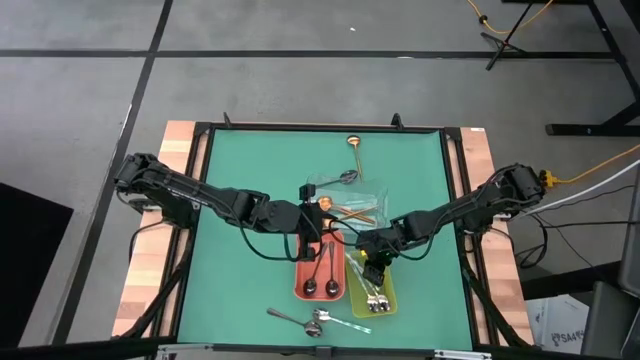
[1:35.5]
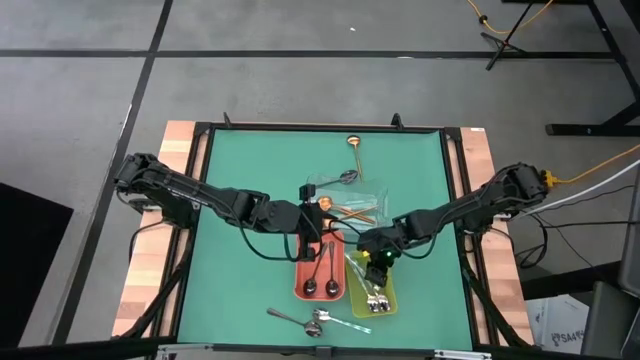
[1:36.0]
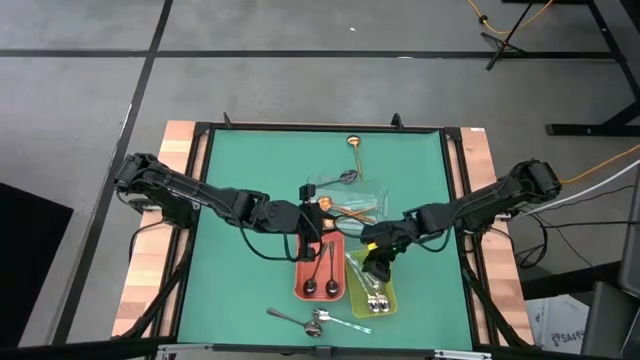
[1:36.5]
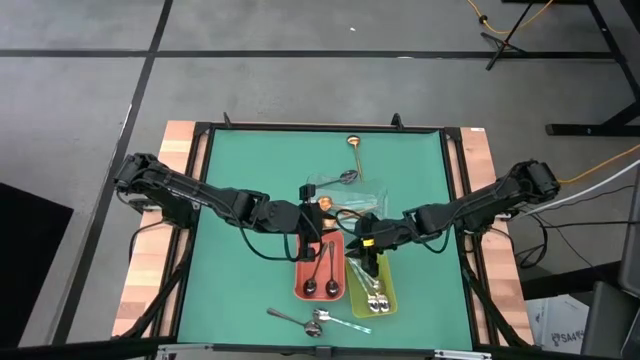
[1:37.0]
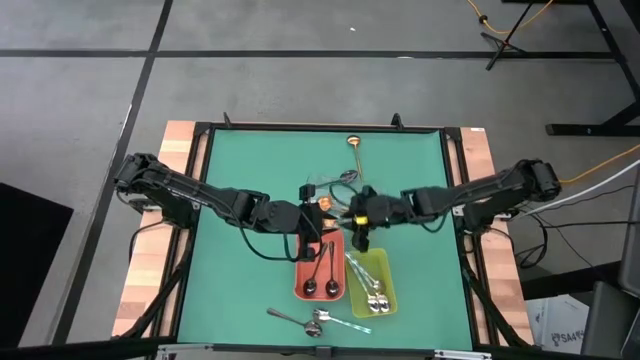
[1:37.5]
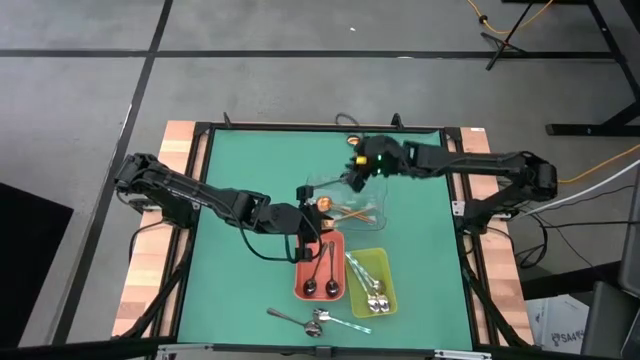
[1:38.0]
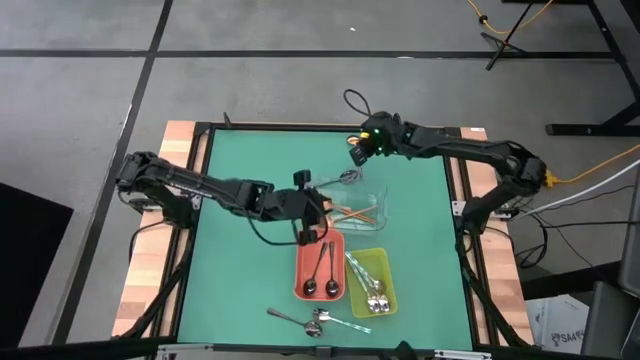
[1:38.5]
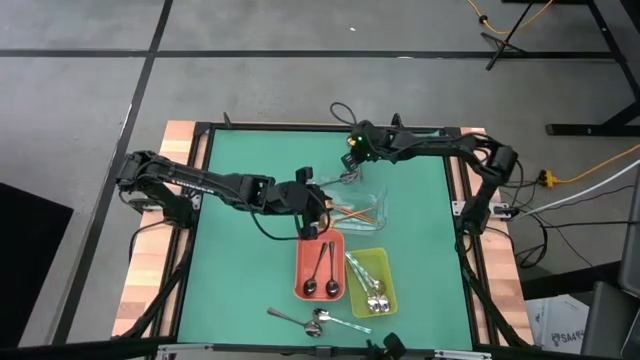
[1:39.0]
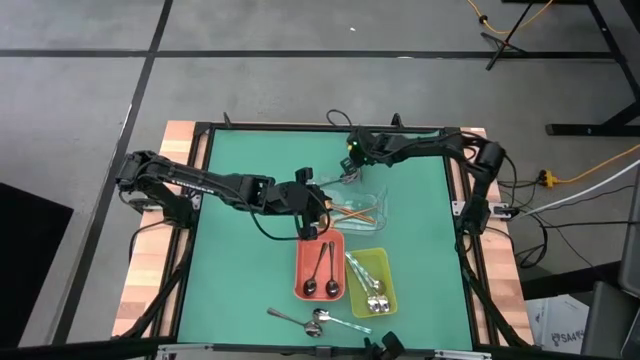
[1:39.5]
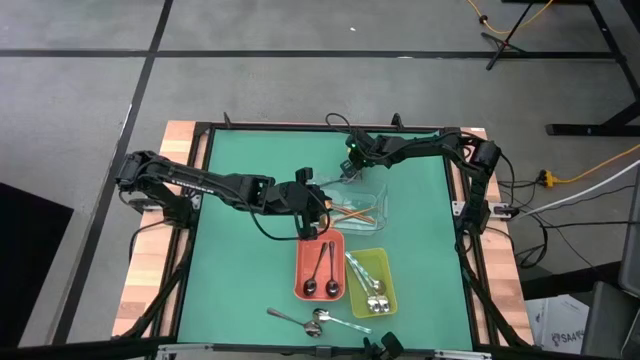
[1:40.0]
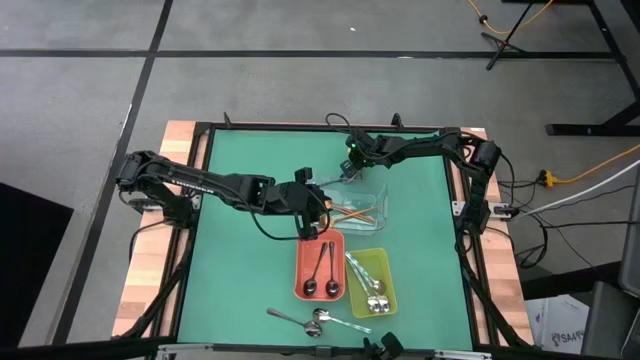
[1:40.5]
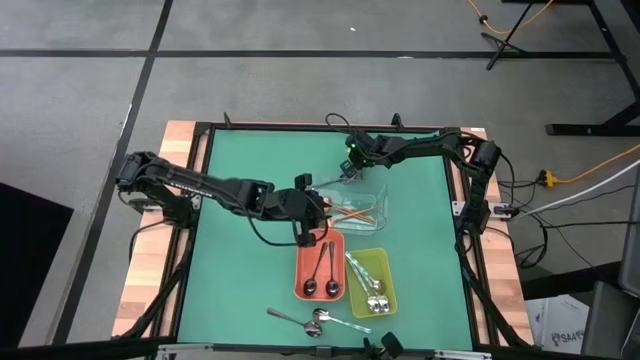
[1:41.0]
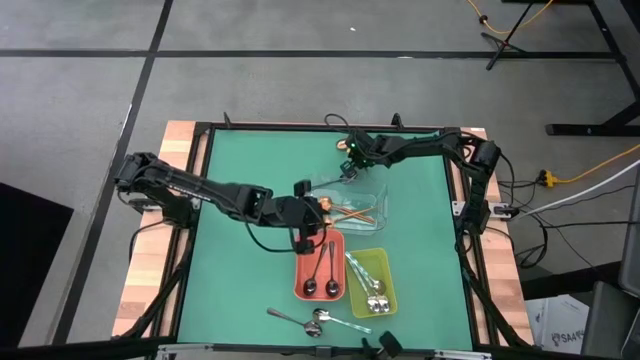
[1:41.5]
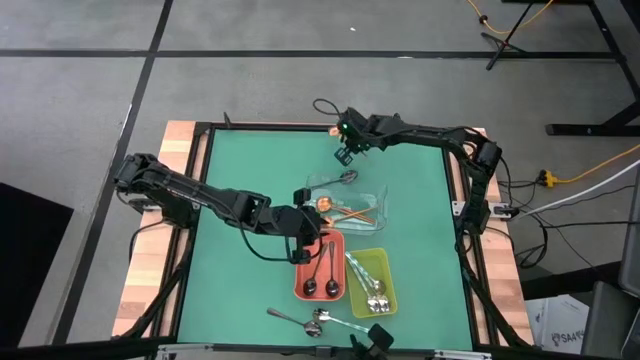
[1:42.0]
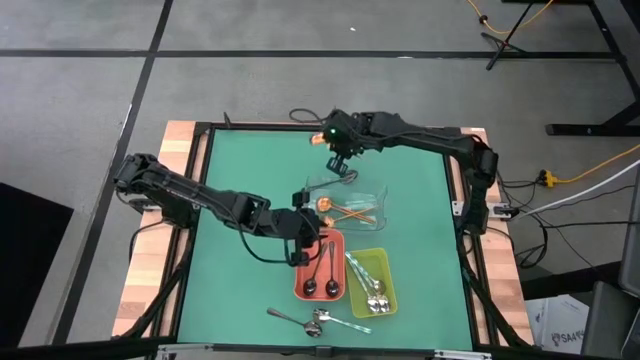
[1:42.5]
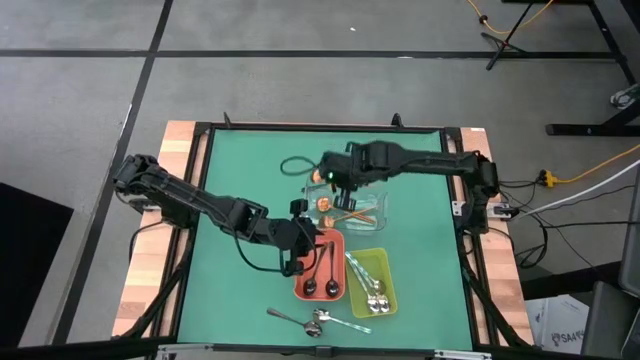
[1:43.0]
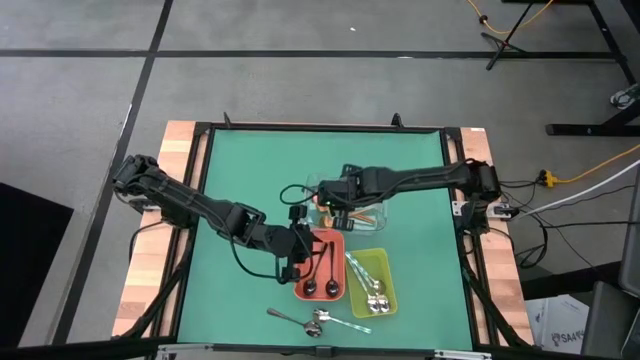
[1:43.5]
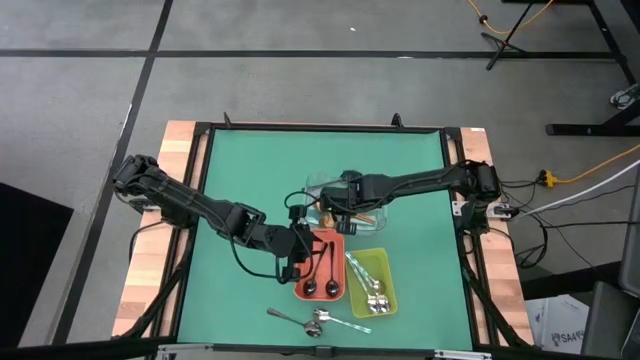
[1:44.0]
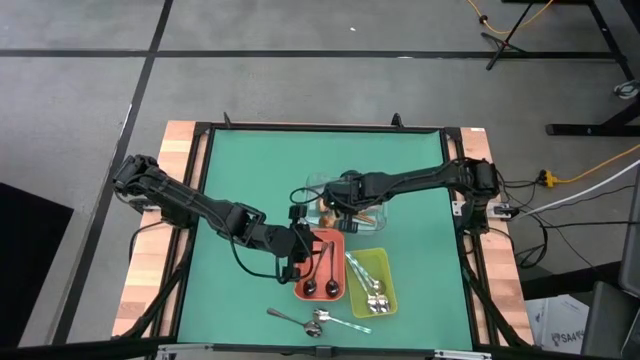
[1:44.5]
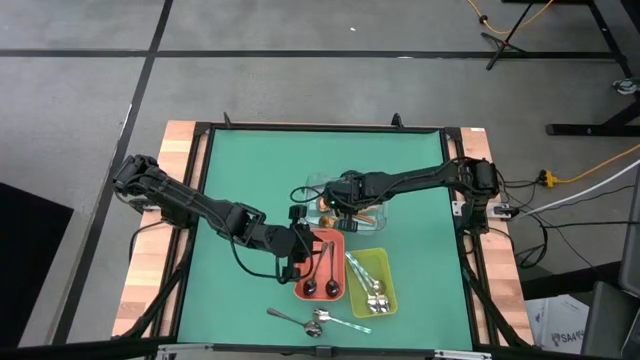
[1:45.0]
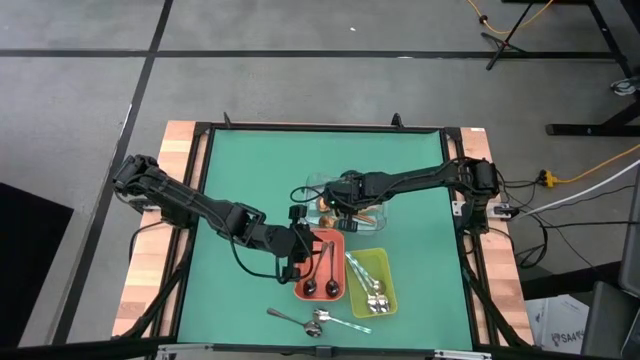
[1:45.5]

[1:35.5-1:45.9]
Task: Sort silverware by color (type)
Put the gold spoon into the transparent bin

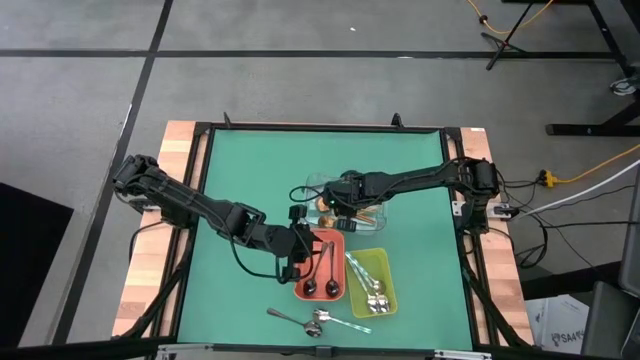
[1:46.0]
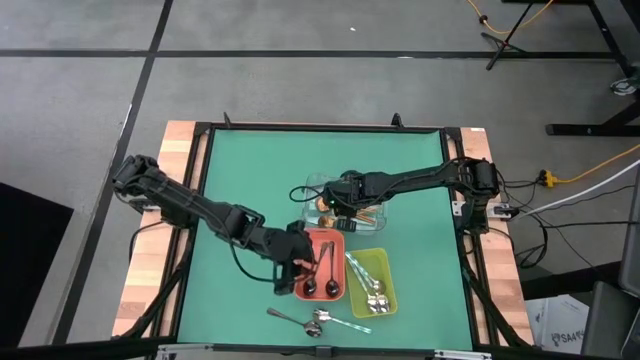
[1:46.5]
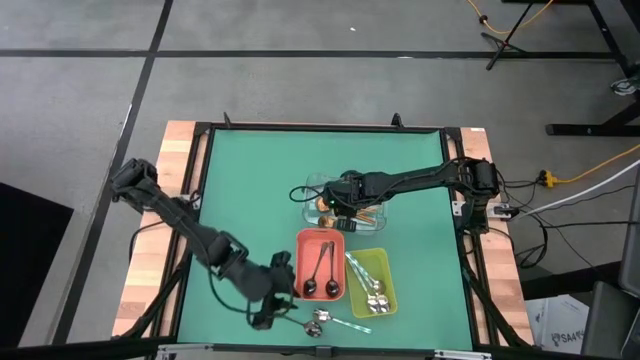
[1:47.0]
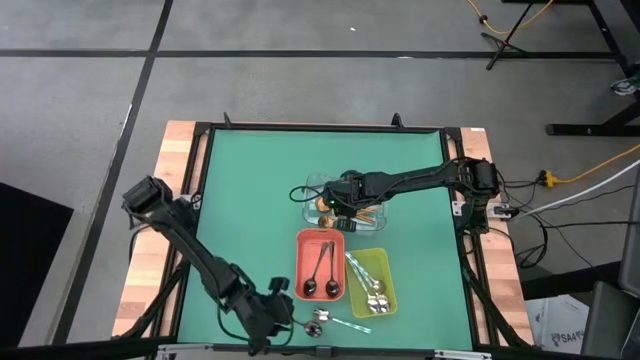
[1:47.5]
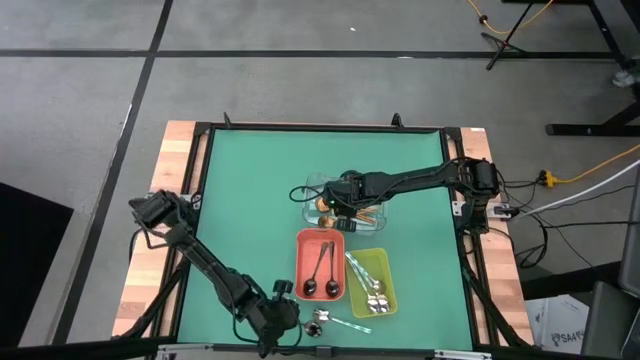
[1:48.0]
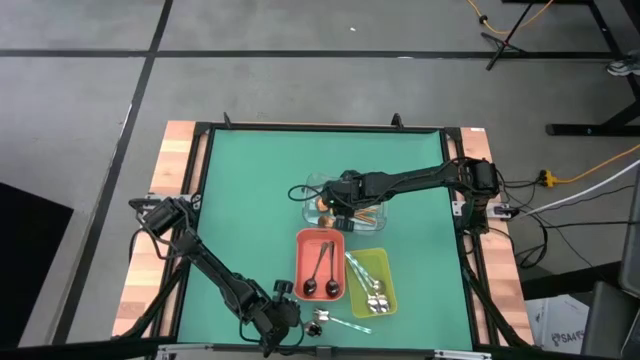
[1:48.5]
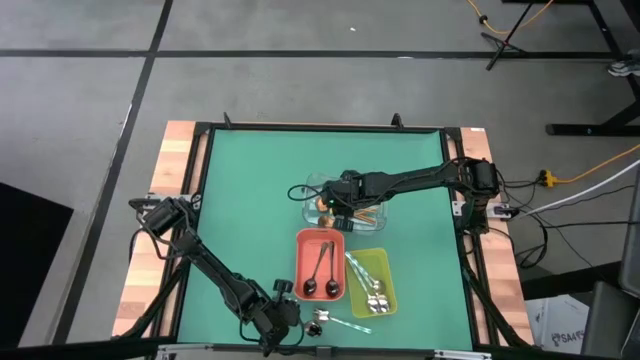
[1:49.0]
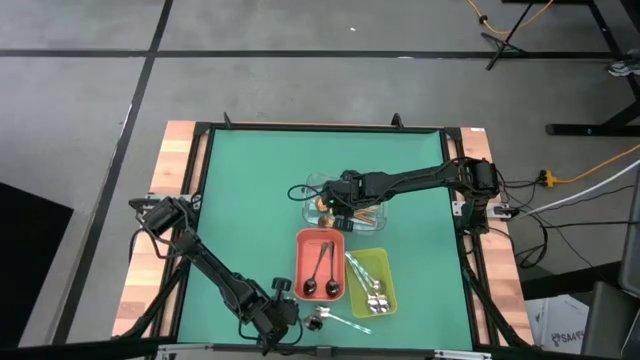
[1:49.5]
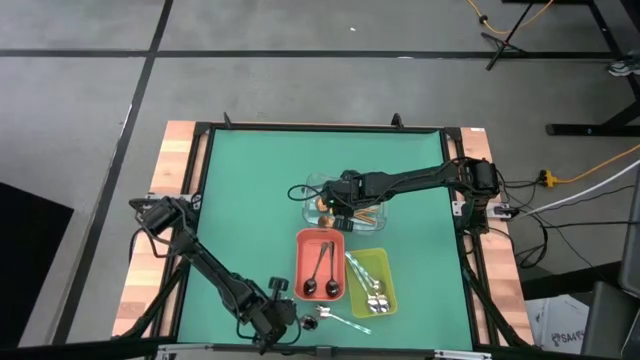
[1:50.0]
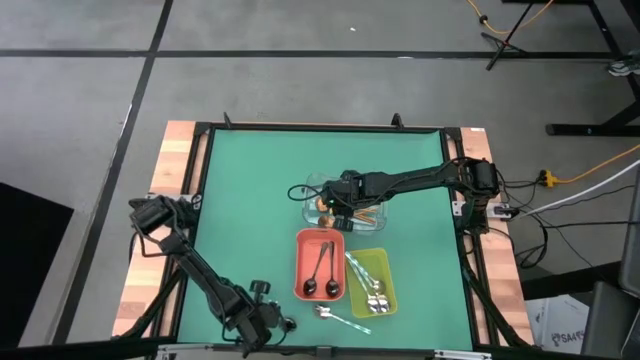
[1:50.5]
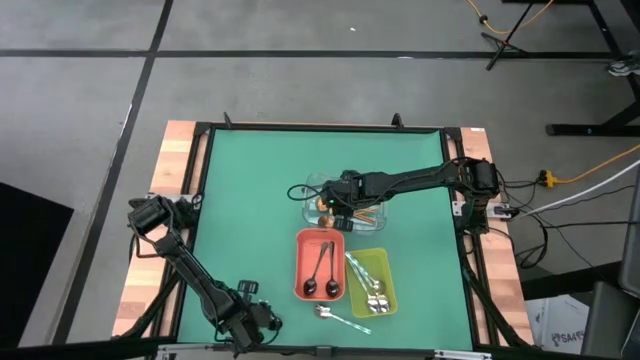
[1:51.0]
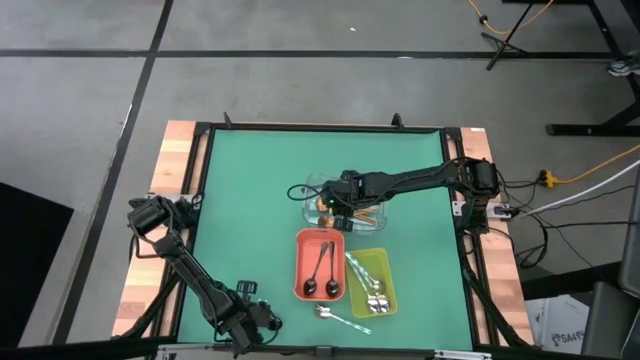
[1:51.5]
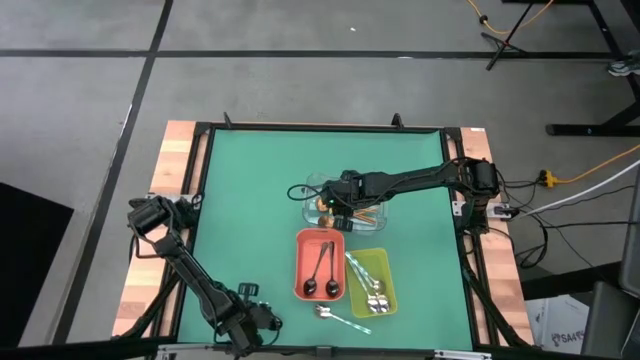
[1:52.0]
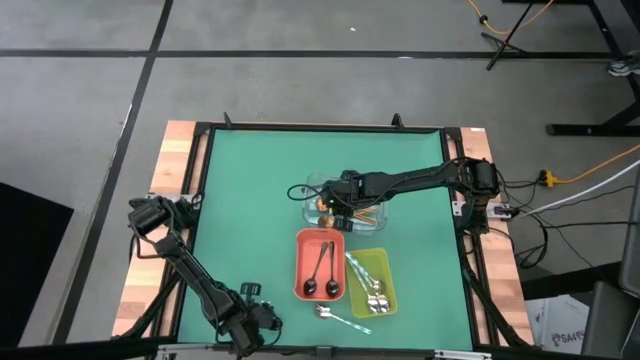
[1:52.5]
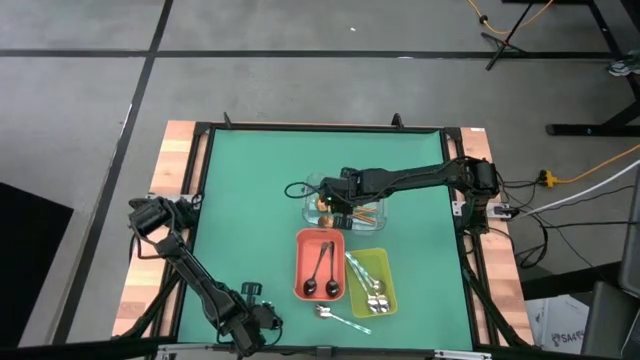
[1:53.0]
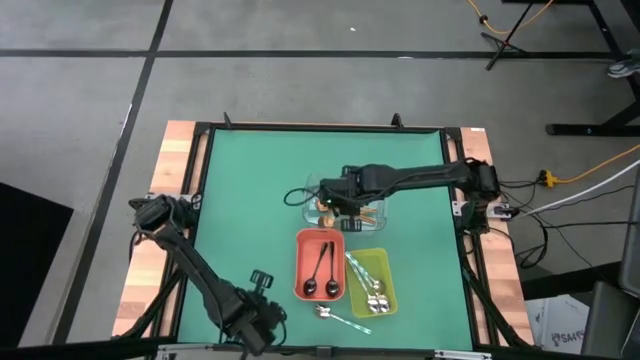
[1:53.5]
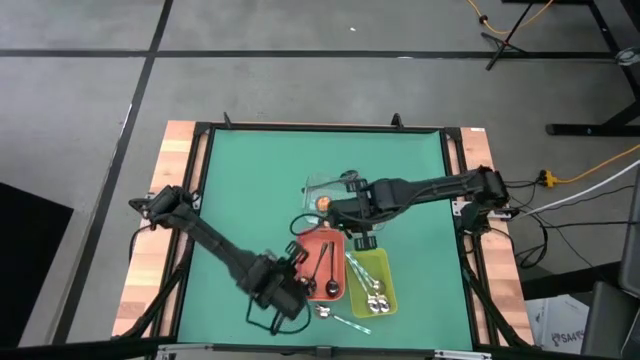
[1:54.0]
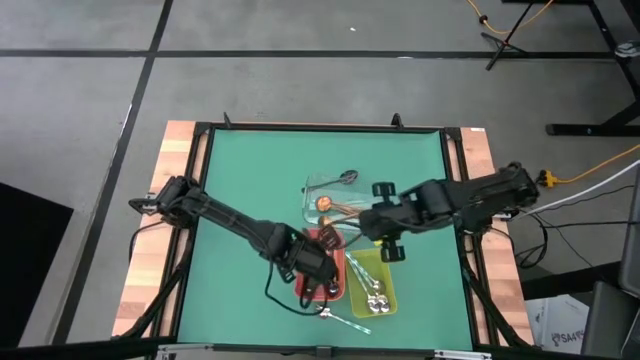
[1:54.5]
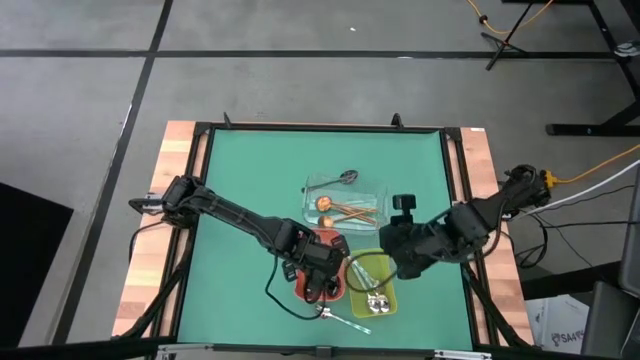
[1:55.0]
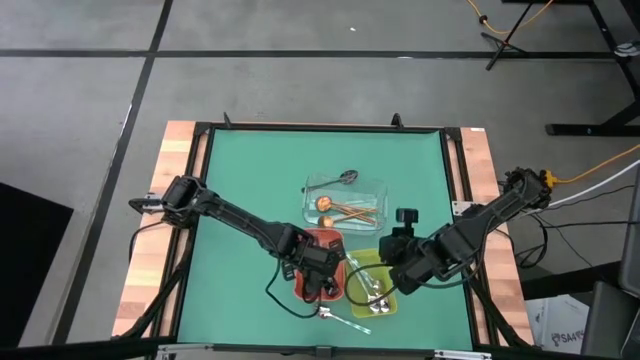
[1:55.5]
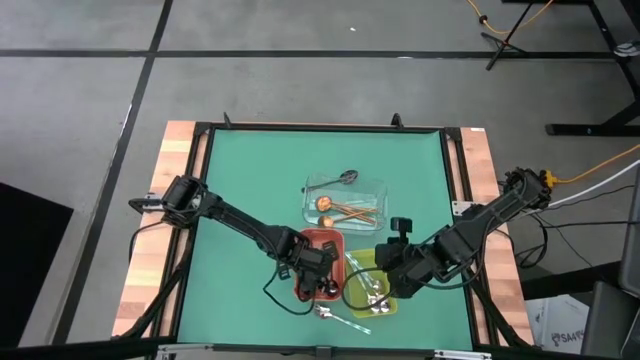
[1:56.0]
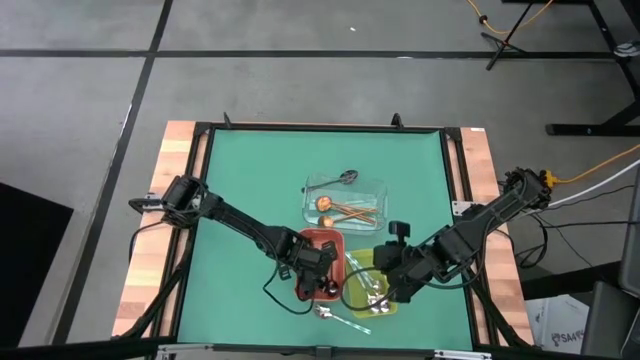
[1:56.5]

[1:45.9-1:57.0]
Put the black spoon into the orange bin
